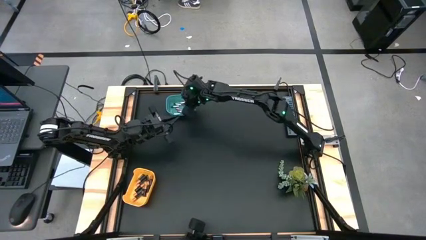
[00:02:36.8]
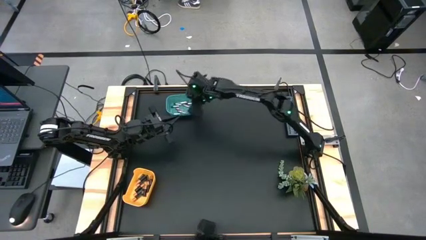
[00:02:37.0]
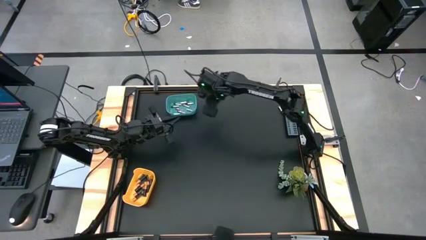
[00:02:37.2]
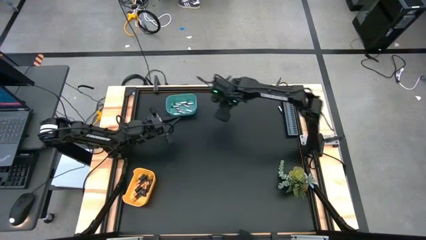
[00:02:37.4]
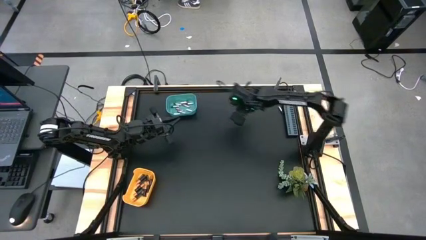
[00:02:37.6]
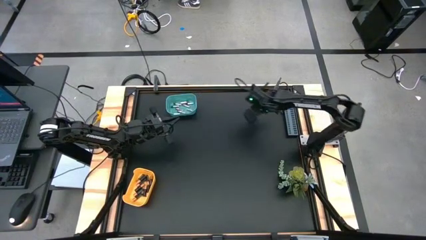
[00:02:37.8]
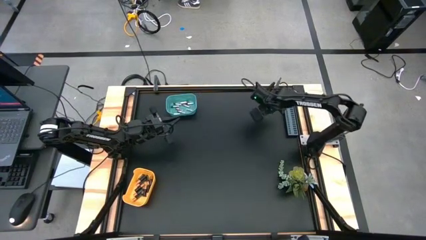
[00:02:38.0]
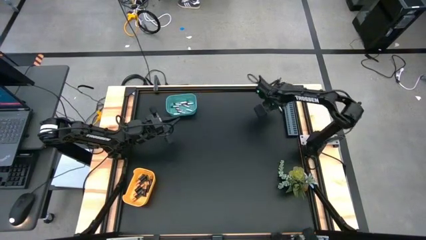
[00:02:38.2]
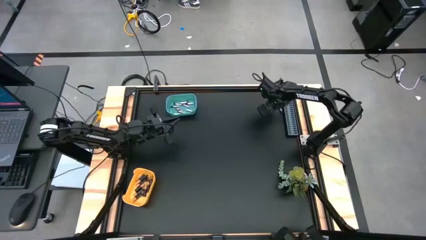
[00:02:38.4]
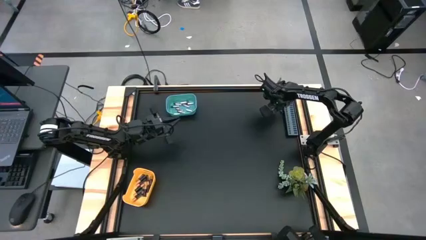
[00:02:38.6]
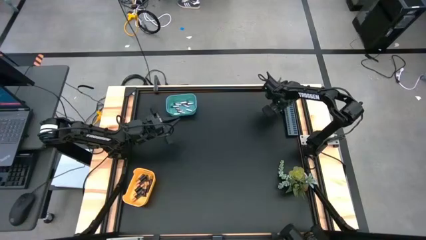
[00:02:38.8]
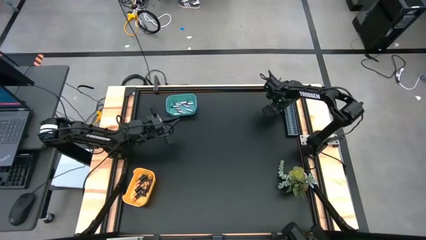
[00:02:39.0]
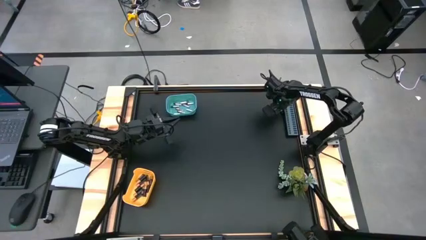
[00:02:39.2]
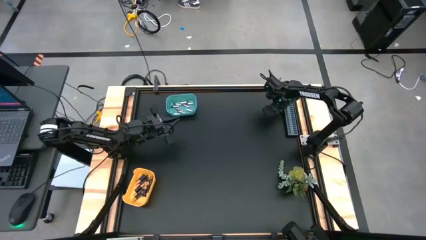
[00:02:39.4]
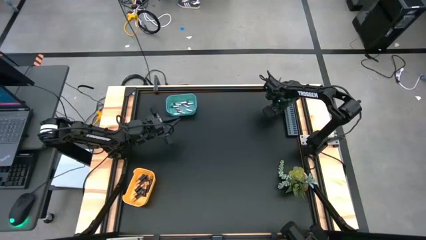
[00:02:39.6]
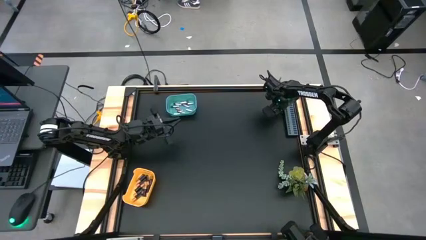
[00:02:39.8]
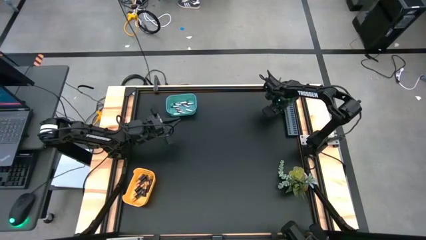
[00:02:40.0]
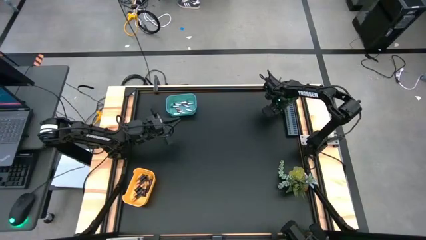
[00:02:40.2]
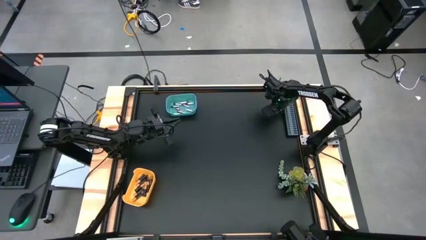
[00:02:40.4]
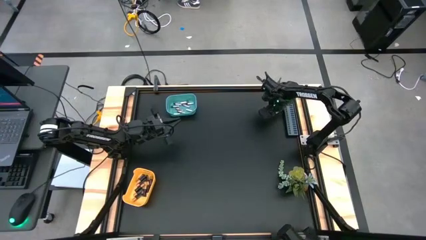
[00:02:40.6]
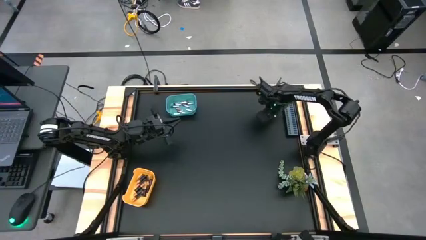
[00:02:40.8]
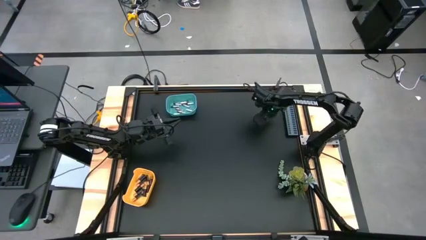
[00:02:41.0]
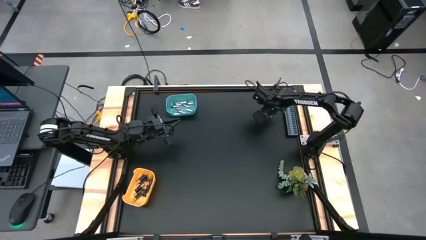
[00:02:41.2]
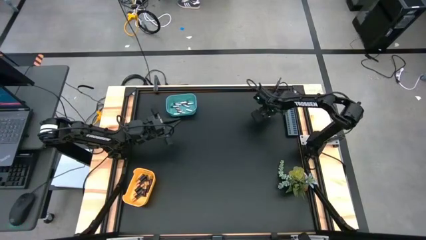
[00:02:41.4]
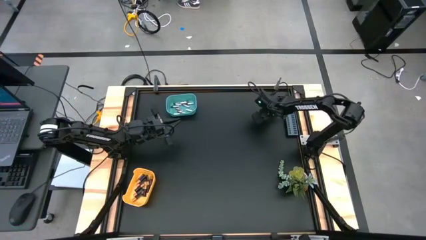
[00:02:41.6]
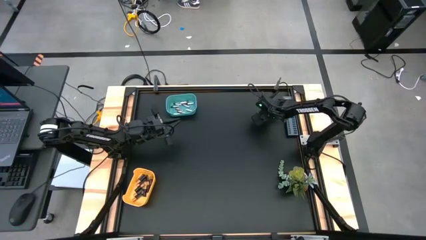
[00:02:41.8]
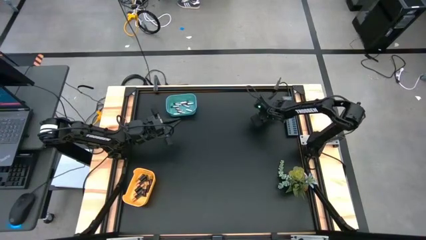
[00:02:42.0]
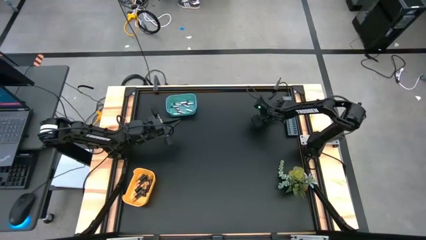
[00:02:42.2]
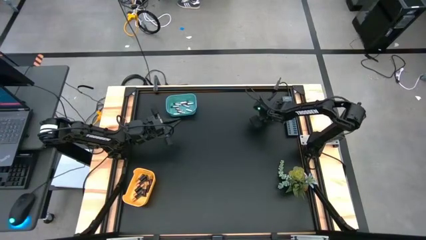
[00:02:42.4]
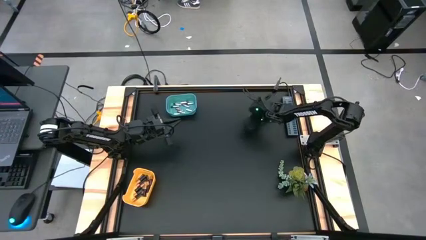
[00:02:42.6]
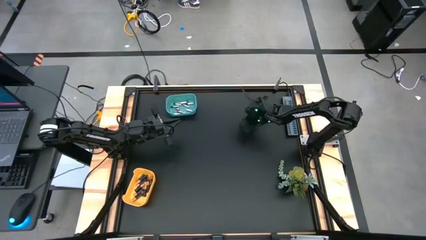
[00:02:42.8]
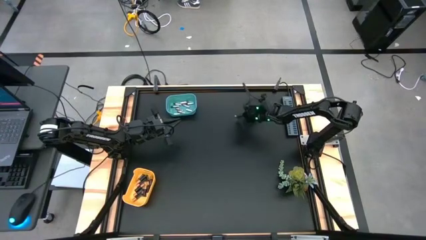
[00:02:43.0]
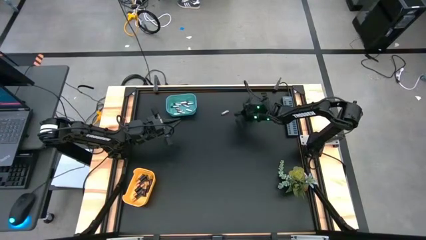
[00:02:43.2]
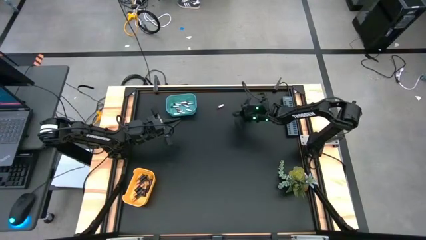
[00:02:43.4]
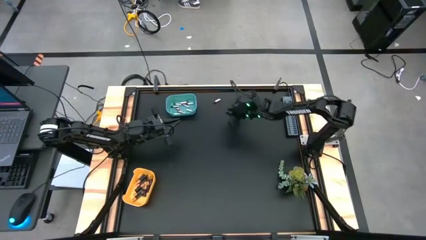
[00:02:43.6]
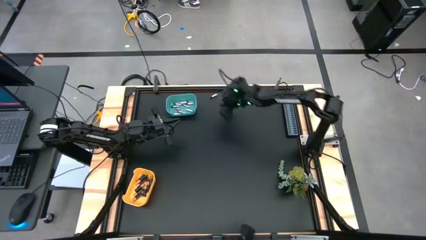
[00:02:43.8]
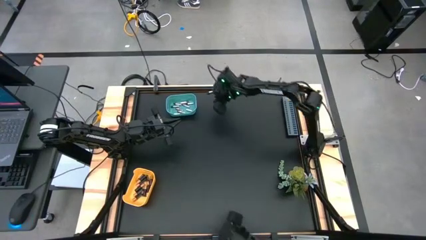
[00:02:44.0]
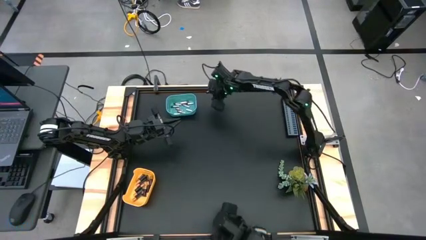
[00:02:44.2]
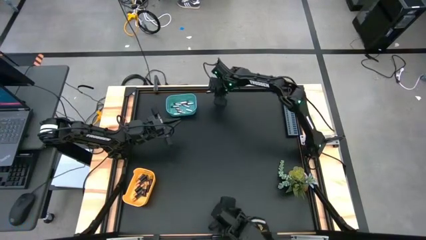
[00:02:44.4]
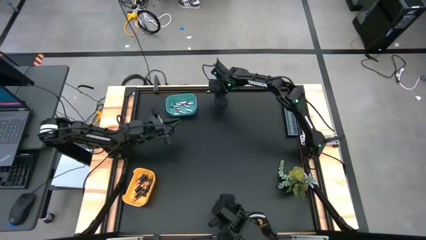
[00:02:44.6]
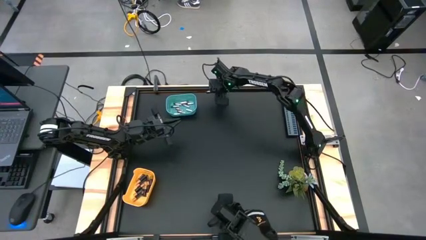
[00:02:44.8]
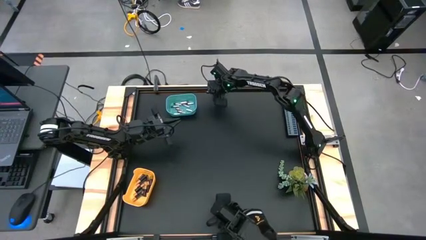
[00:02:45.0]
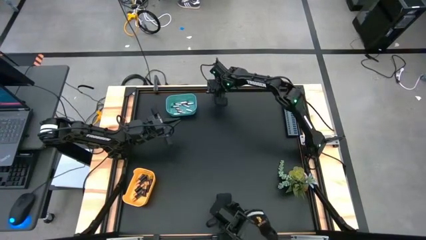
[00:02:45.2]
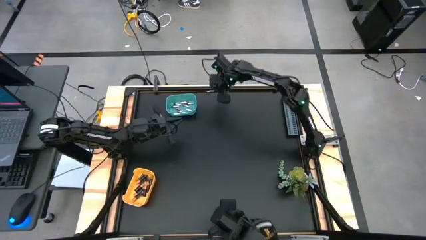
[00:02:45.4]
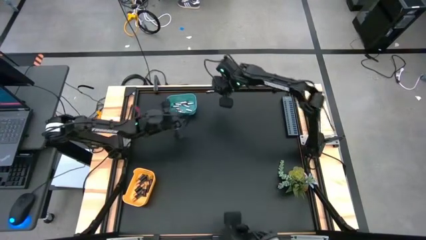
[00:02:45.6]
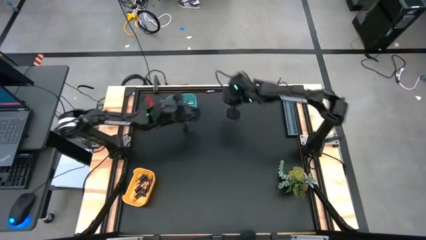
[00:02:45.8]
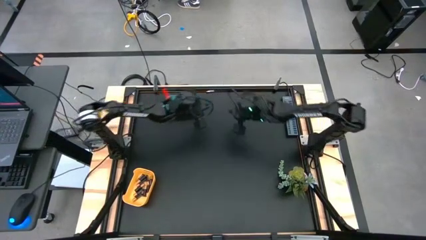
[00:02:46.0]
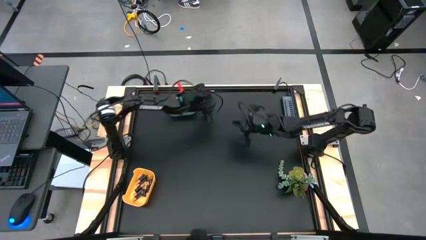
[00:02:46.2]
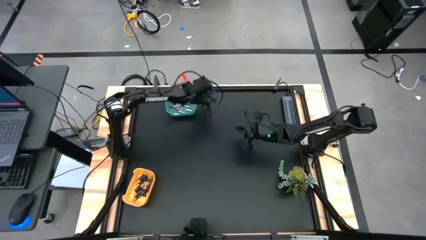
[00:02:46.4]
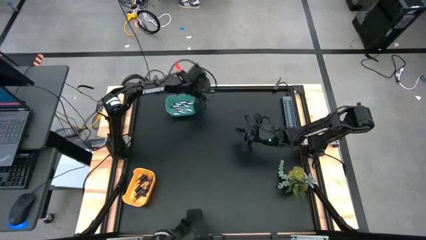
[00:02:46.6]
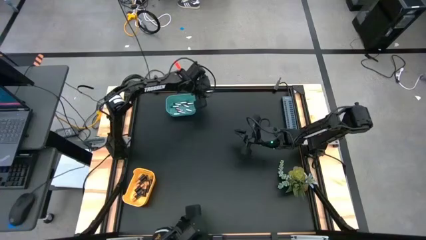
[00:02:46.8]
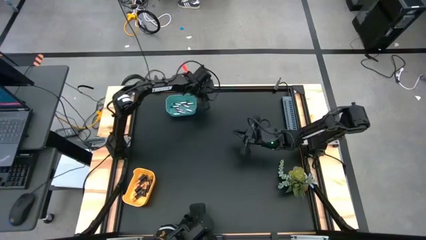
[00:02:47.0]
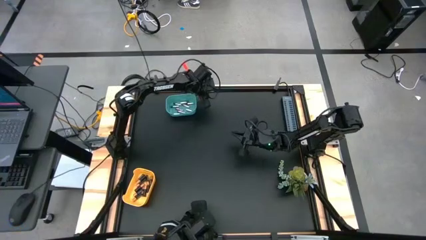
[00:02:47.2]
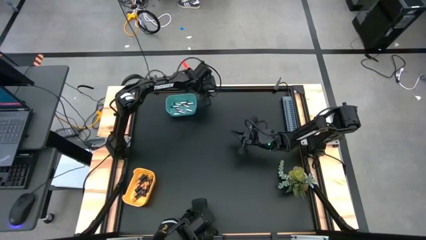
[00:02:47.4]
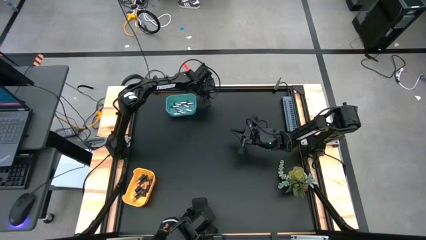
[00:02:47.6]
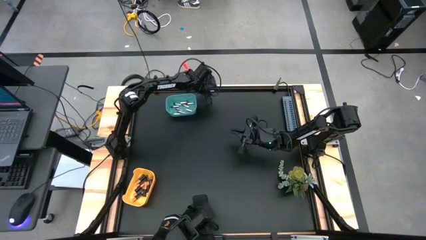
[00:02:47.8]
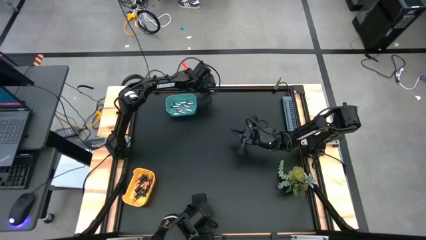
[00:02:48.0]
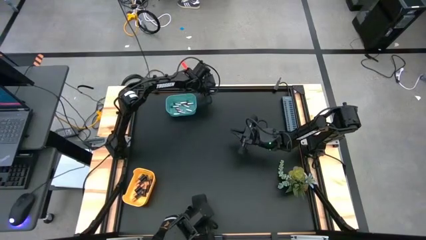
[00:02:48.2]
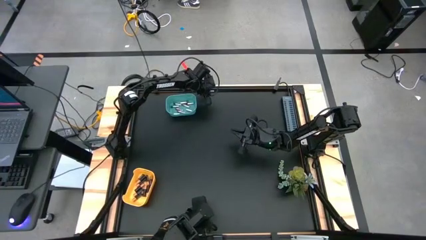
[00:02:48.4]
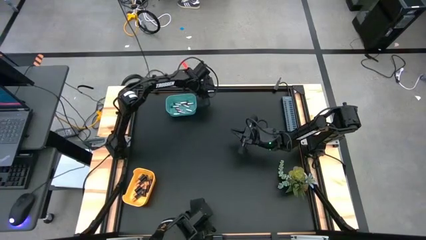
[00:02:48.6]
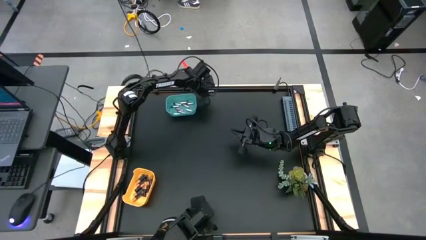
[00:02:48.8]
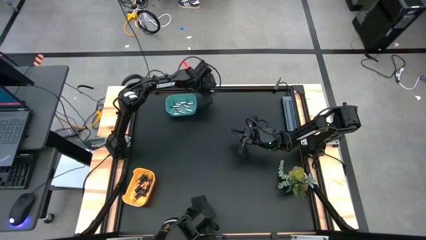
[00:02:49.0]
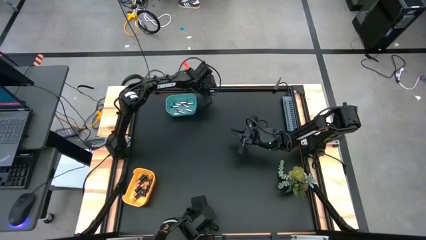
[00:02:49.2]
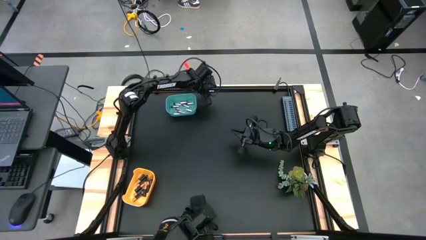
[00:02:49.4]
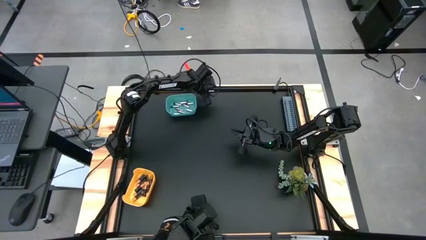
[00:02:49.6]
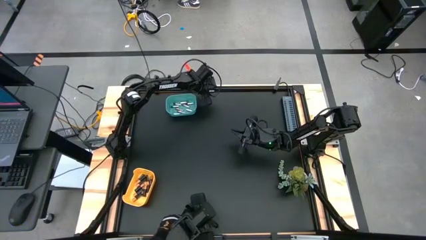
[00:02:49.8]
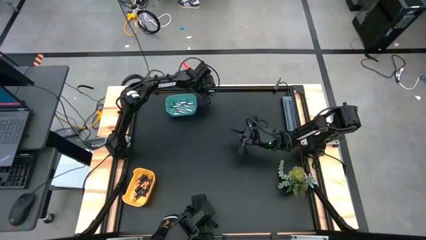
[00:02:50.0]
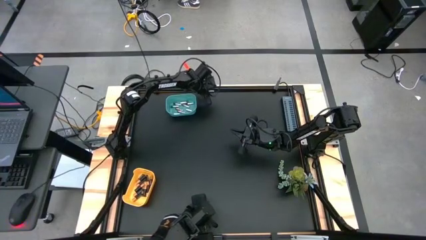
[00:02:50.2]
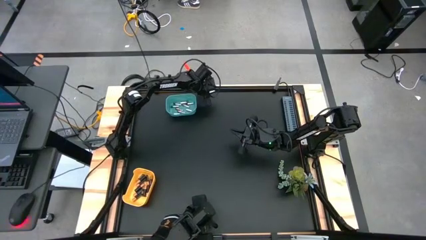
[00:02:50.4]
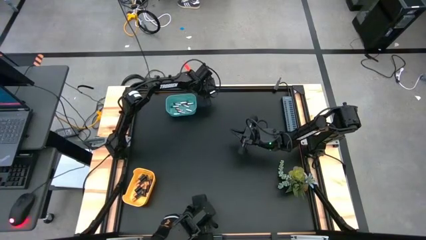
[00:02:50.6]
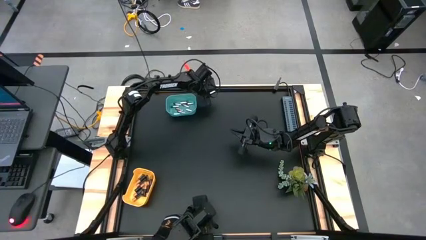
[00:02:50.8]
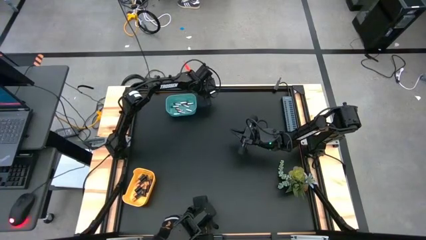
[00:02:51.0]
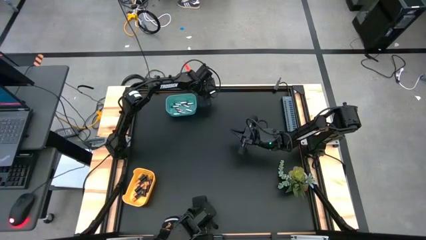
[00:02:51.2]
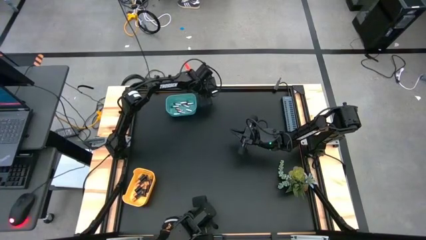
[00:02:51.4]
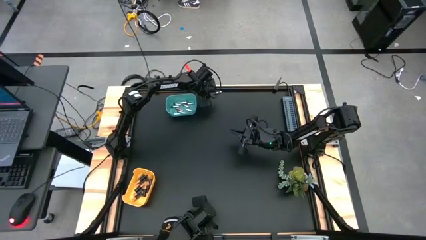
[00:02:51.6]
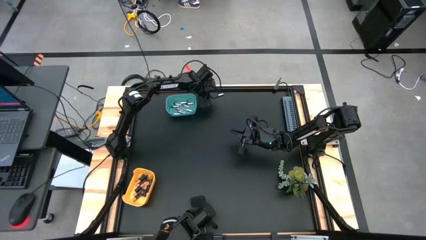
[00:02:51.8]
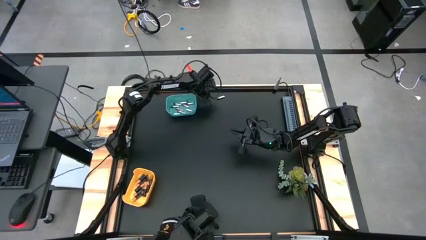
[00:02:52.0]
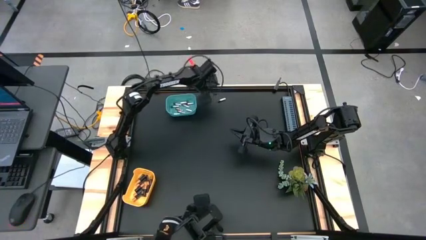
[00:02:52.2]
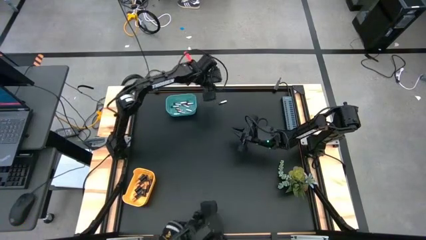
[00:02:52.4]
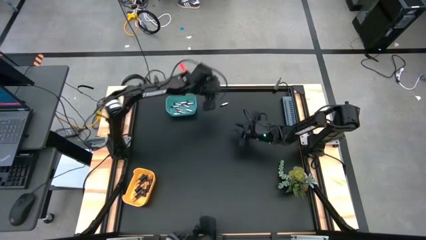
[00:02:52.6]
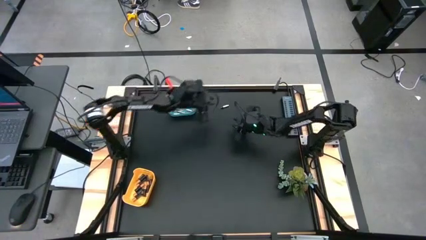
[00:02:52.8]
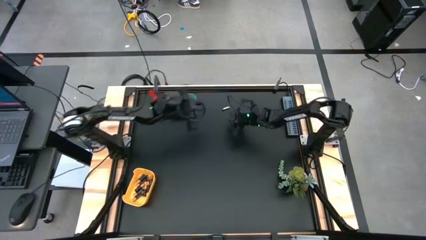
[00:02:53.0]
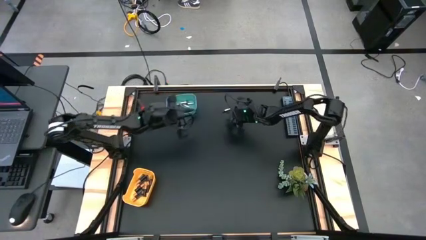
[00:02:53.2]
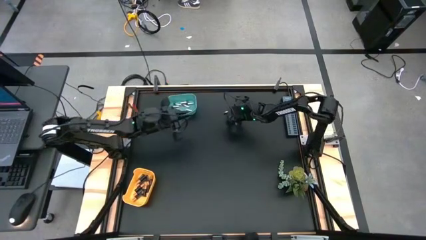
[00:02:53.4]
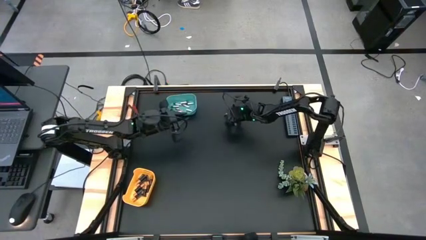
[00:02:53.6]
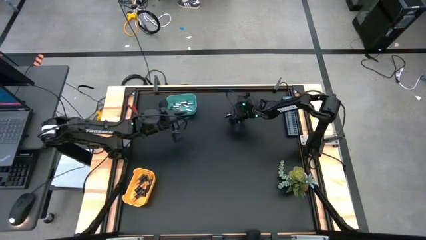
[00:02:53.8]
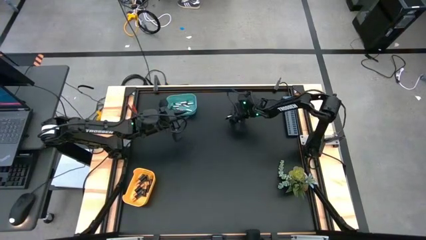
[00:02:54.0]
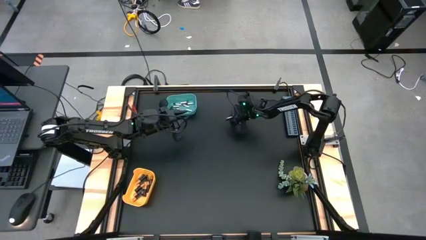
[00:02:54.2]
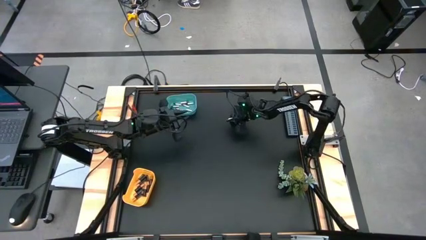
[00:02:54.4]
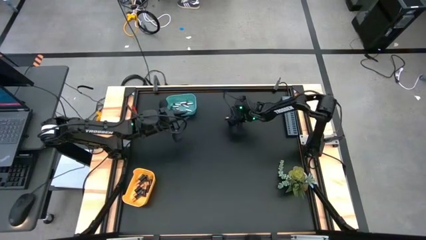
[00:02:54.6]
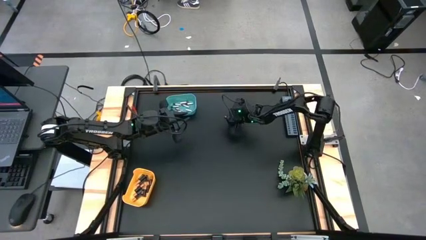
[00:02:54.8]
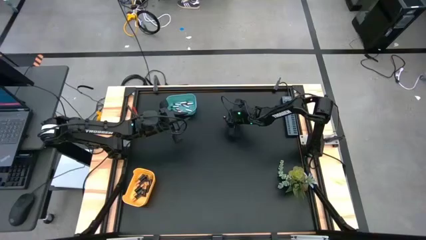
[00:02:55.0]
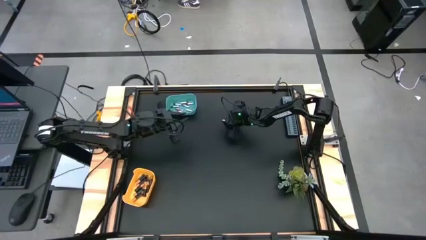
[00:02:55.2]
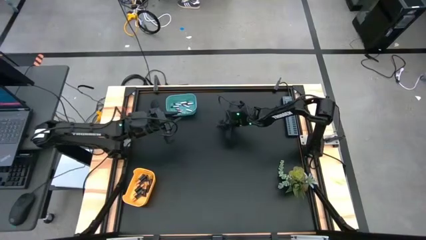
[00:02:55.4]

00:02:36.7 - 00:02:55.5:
Task: Sort batteries
Put the silver battery into the green bin
